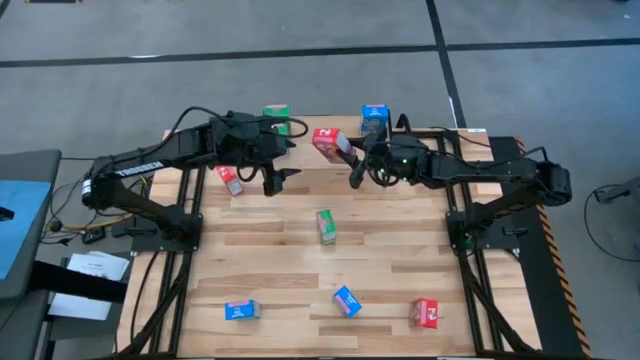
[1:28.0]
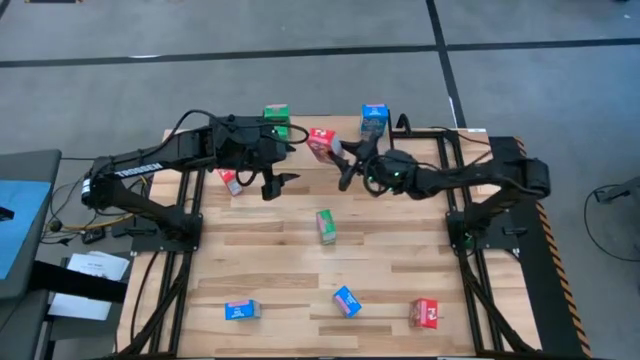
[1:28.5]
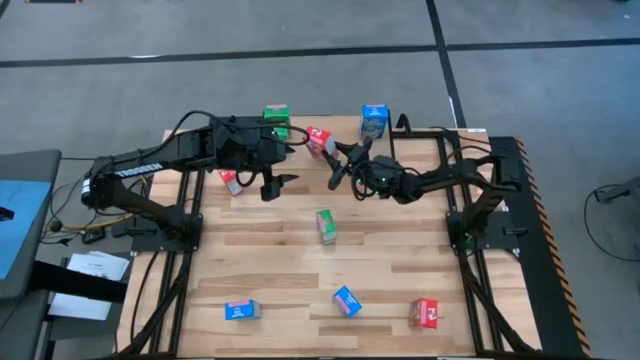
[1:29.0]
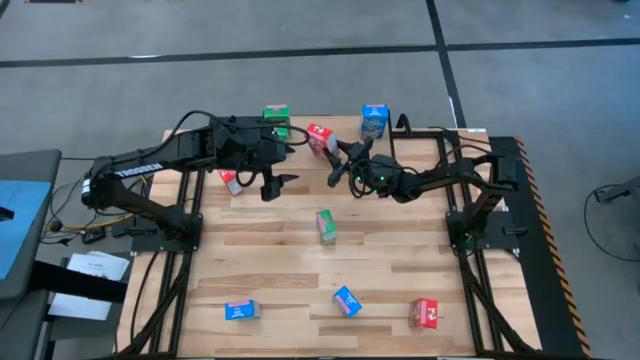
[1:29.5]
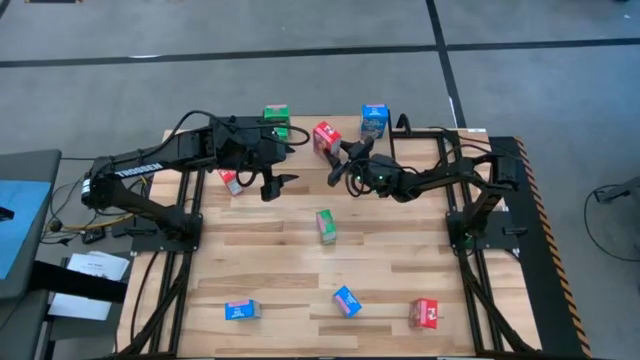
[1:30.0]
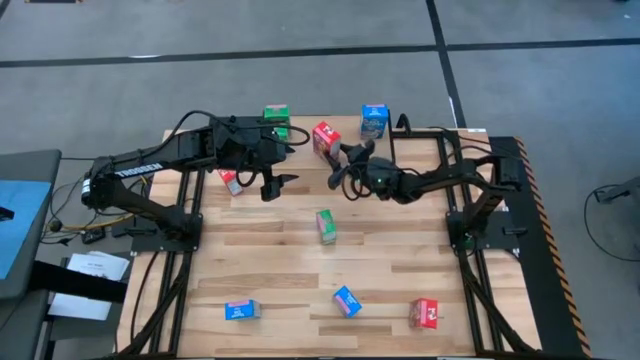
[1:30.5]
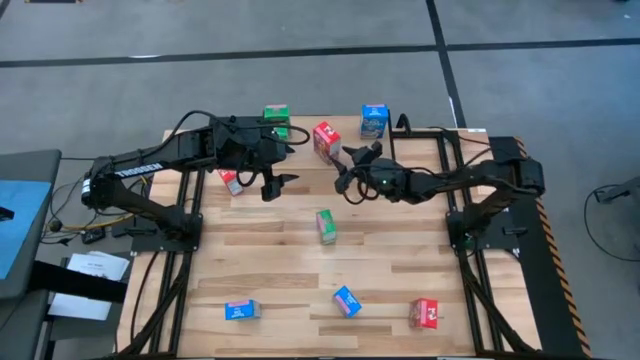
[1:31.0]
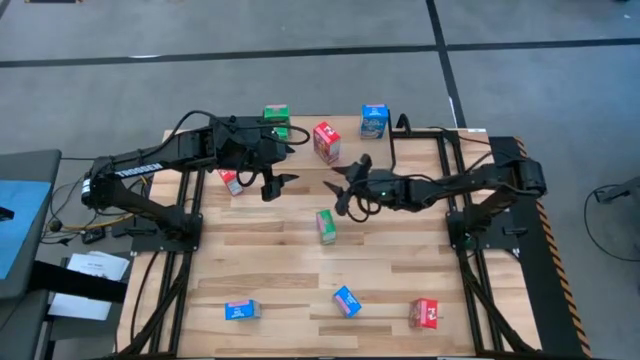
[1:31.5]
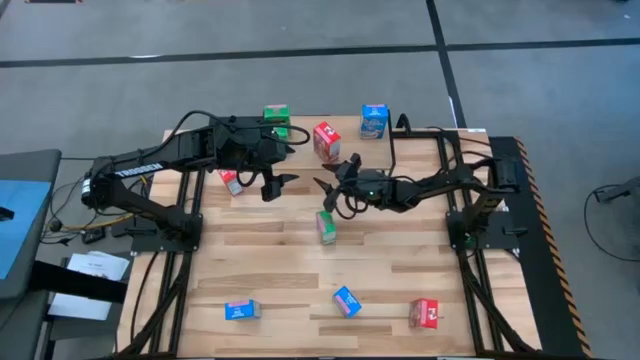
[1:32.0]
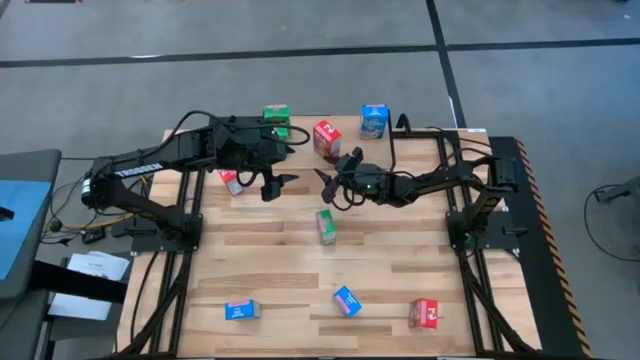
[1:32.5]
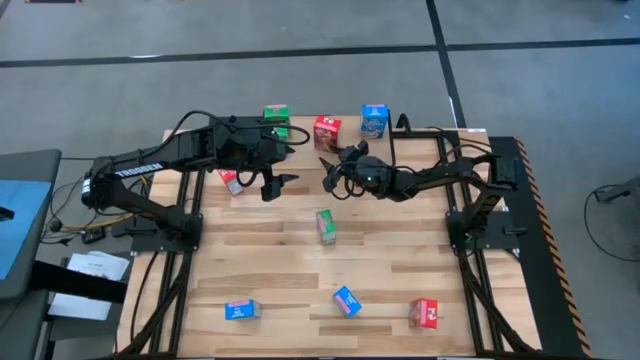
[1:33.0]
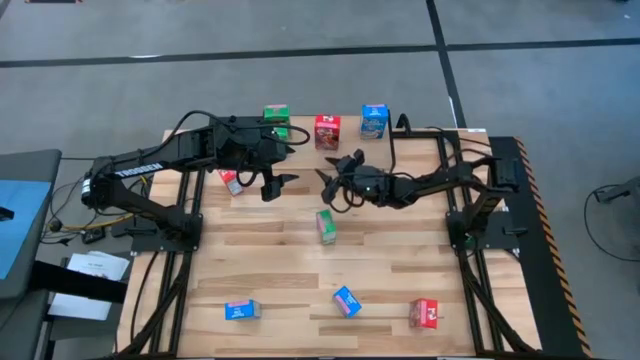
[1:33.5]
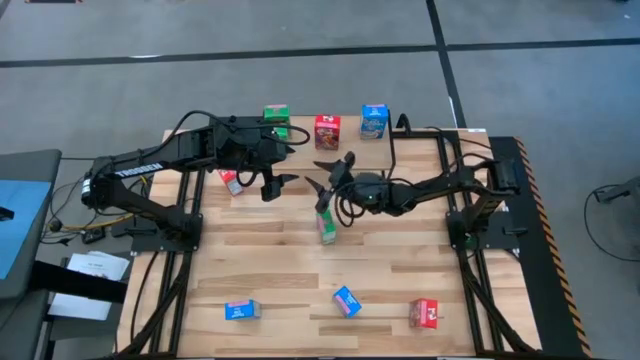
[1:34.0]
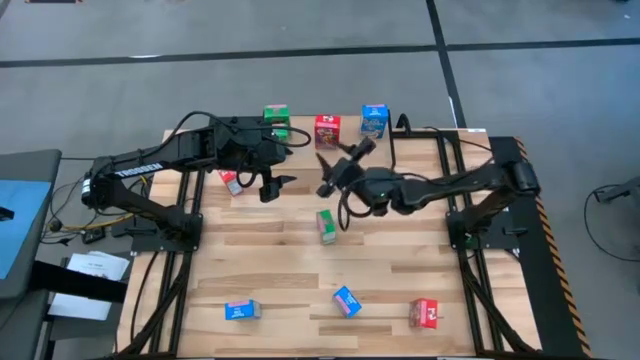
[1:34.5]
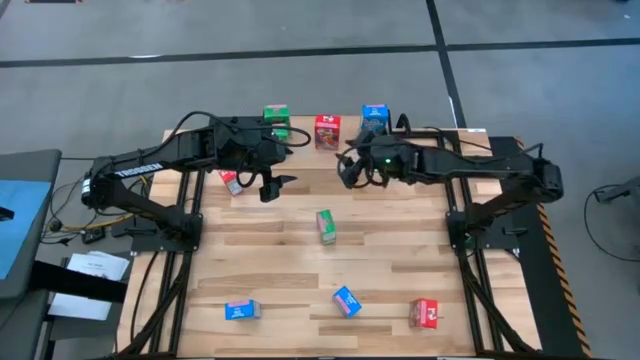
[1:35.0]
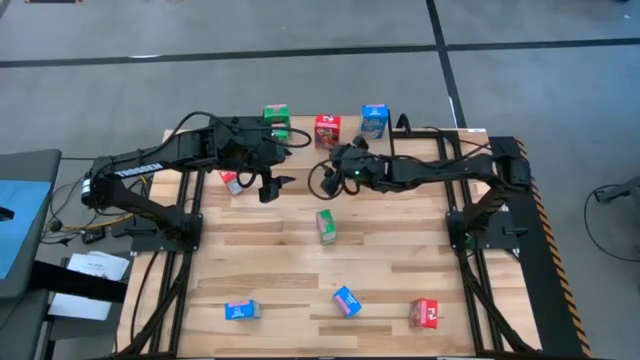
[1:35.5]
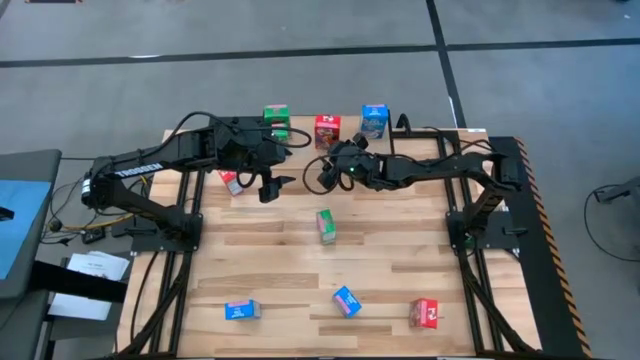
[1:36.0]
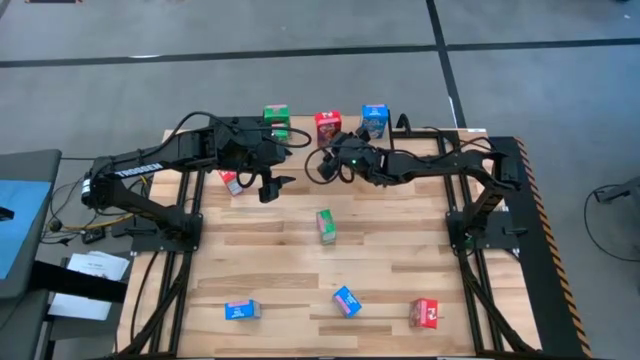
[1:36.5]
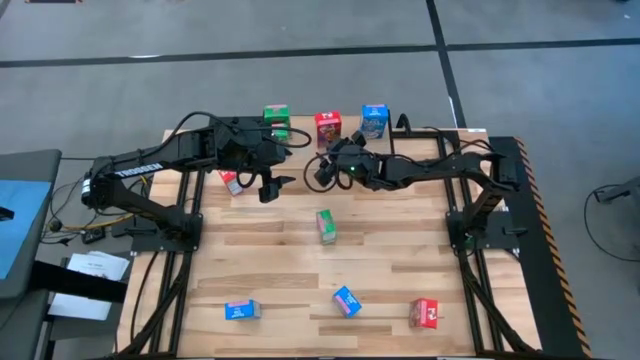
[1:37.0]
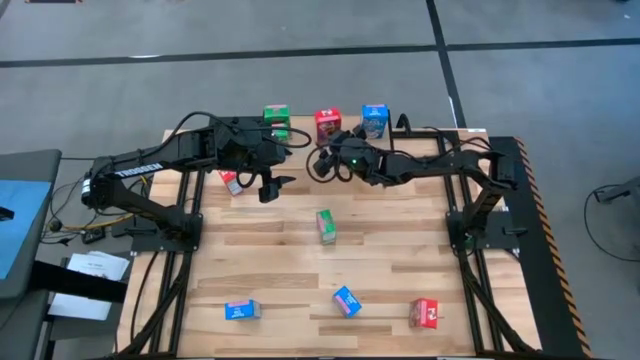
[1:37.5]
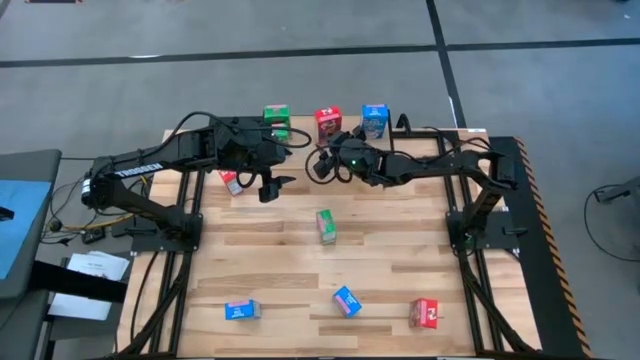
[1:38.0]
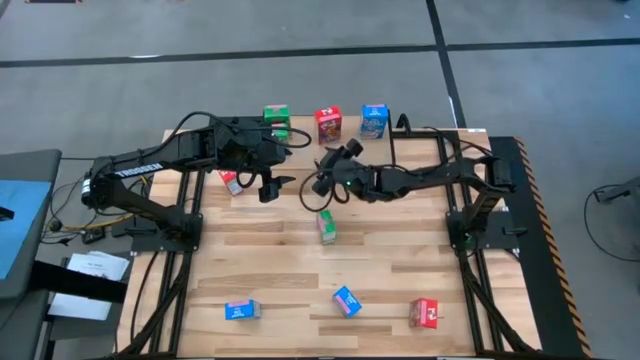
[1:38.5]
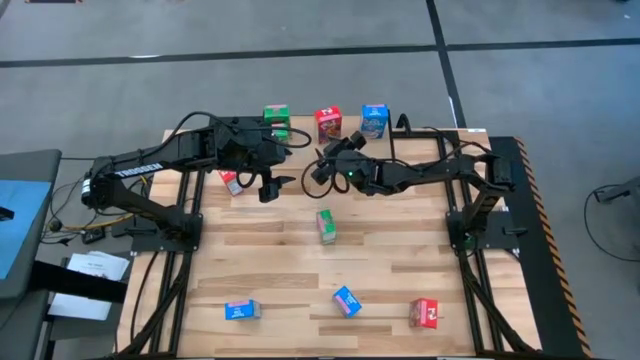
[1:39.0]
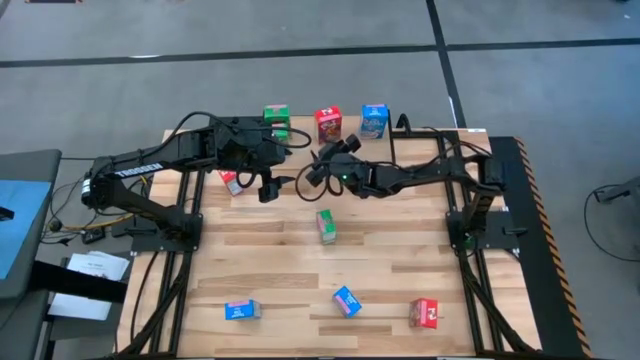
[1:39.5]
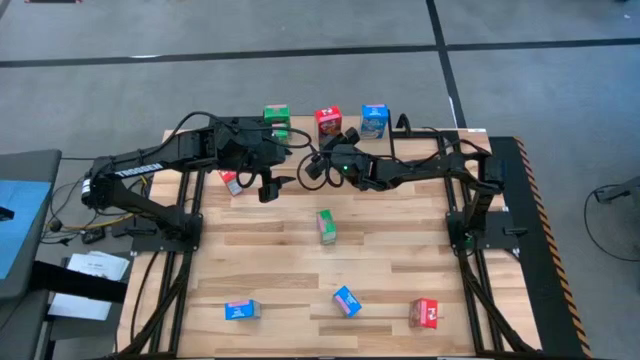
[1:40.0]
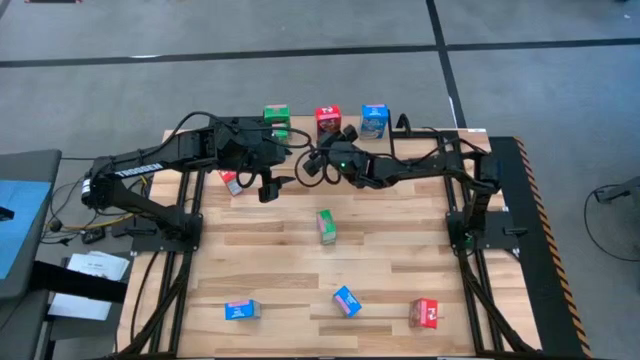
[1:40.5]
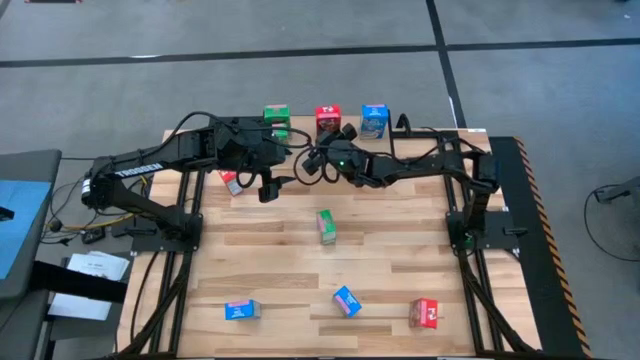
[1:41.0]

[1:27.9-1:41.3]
Task: Stack cereal on shelf
Put the bottom left red cereal box on the shelf

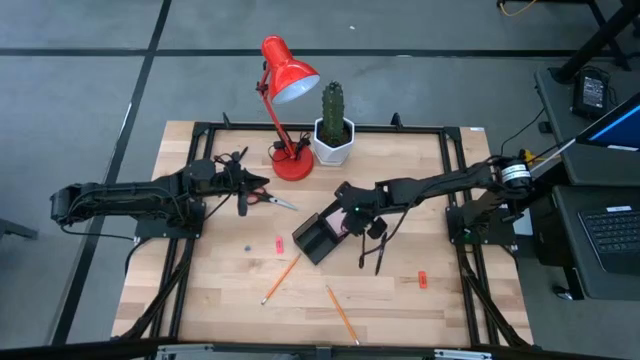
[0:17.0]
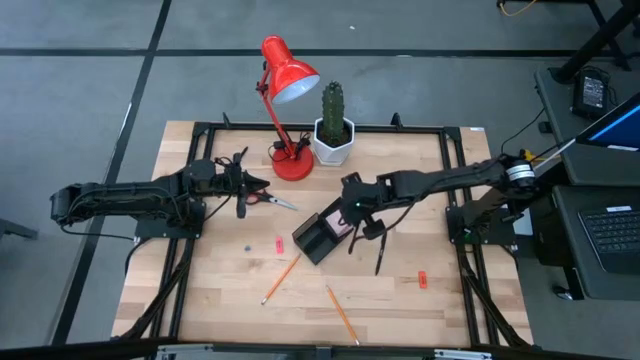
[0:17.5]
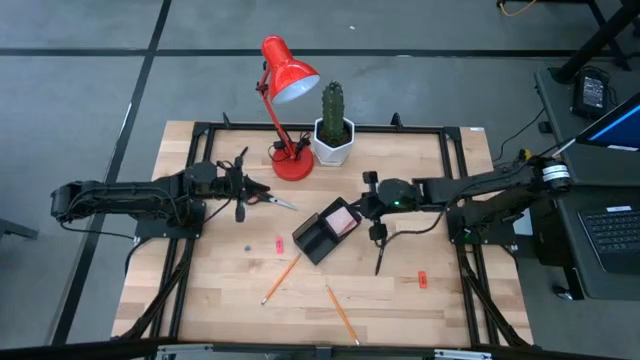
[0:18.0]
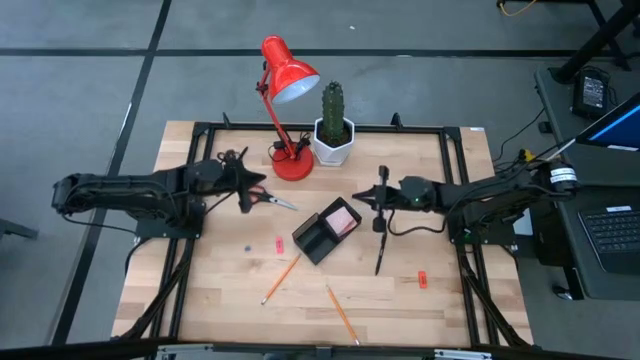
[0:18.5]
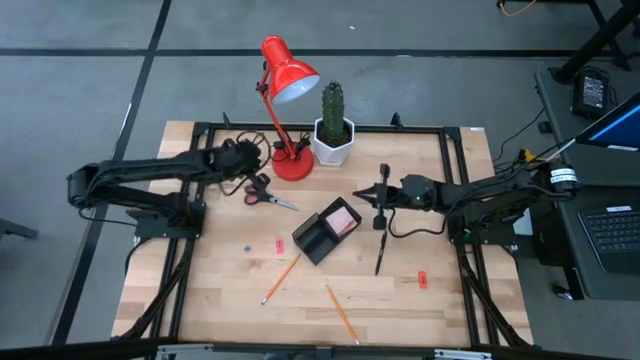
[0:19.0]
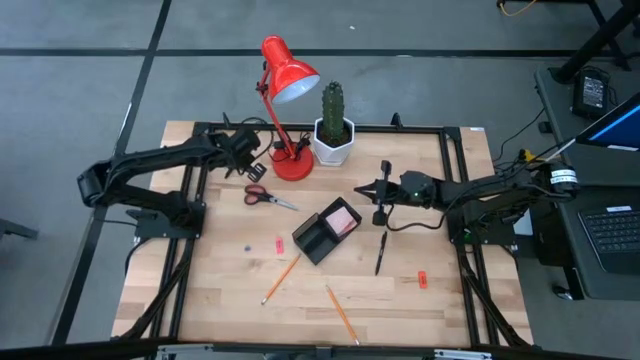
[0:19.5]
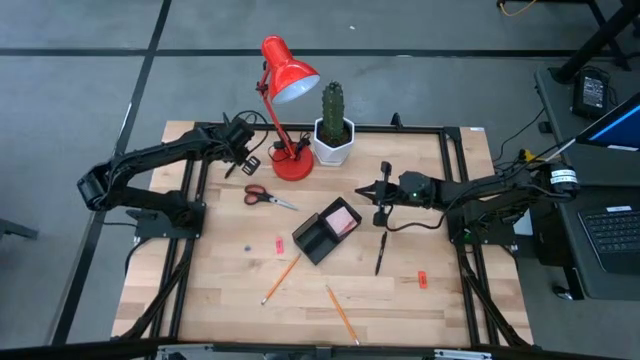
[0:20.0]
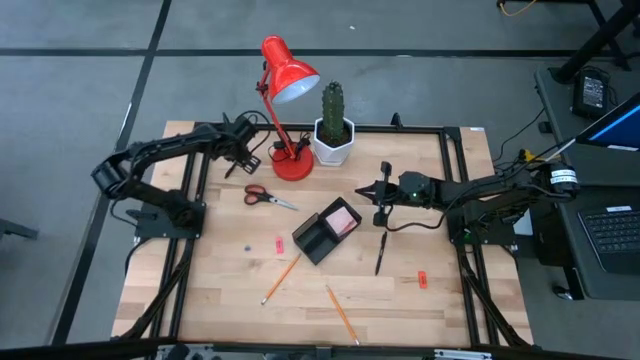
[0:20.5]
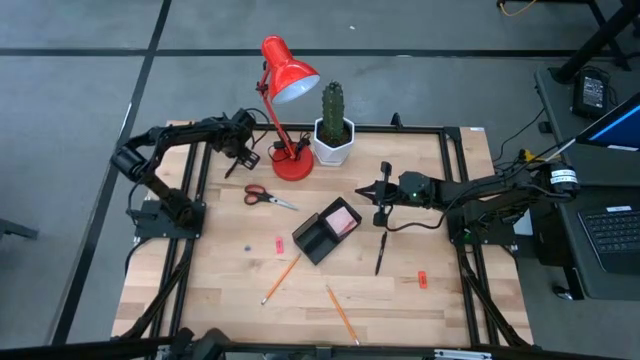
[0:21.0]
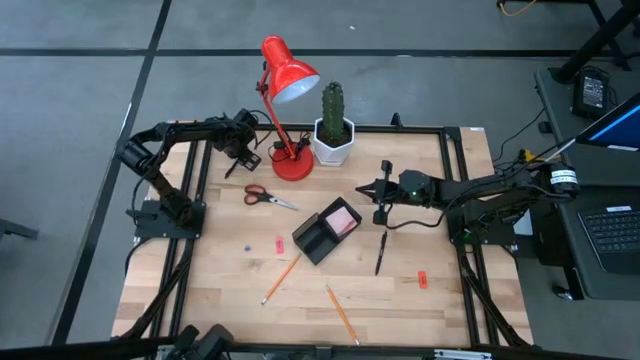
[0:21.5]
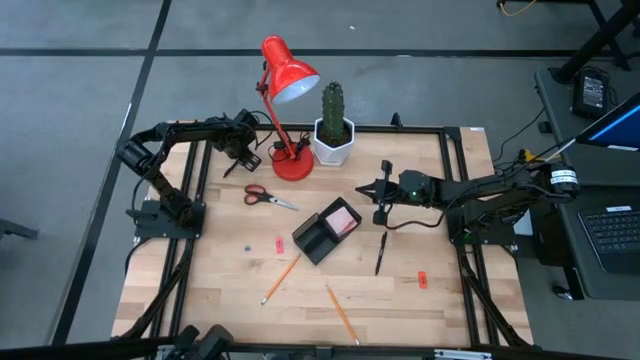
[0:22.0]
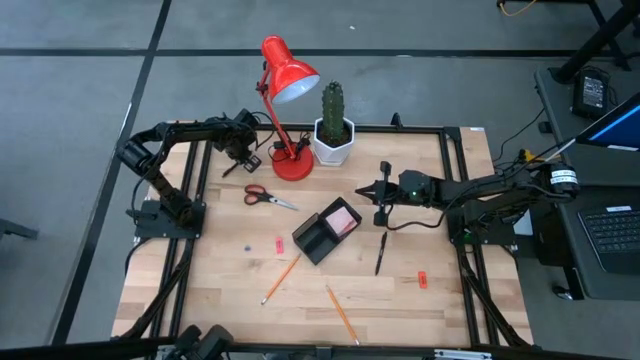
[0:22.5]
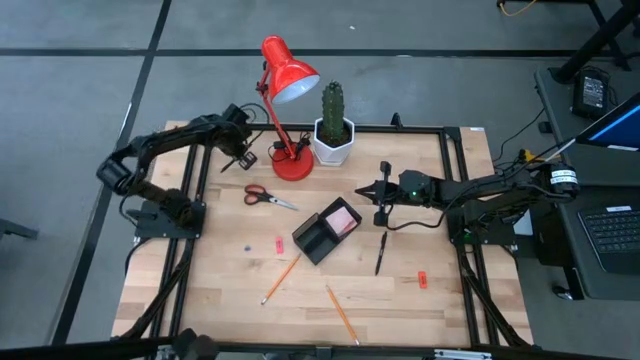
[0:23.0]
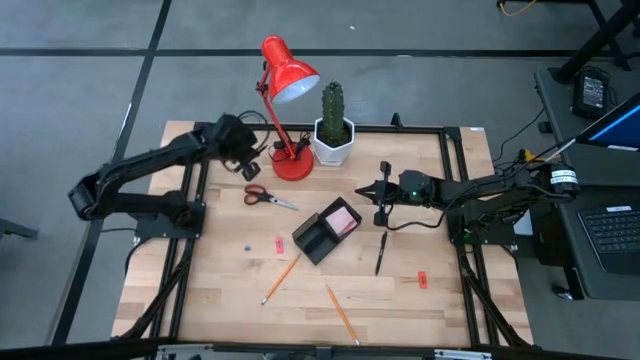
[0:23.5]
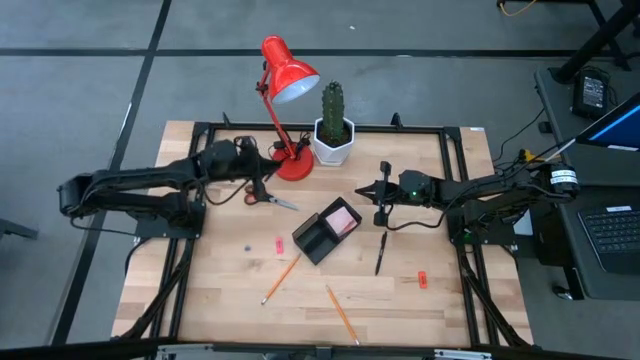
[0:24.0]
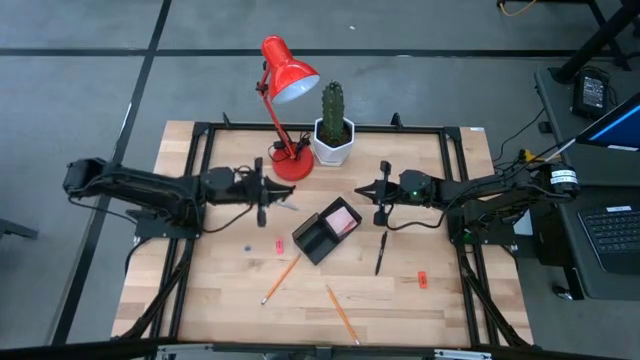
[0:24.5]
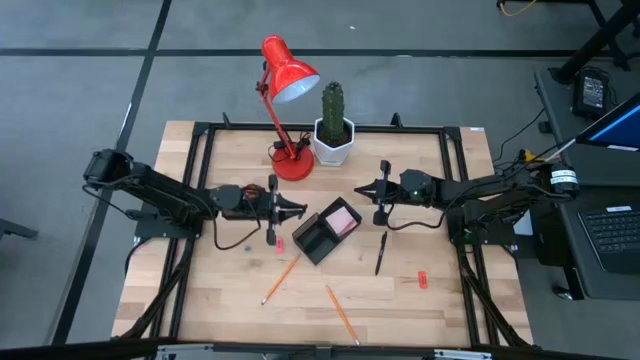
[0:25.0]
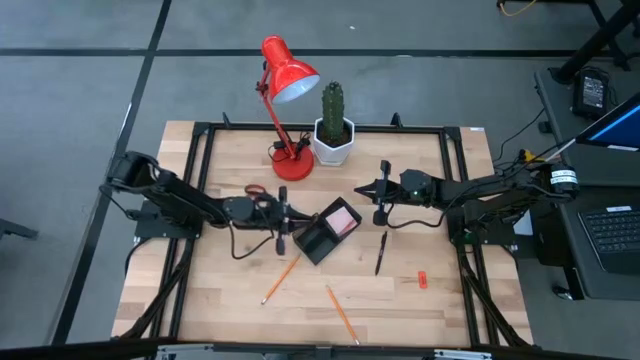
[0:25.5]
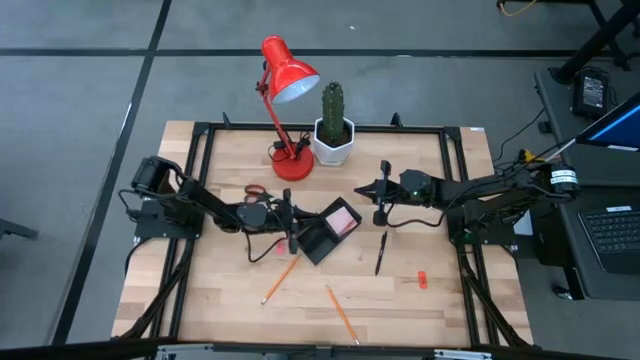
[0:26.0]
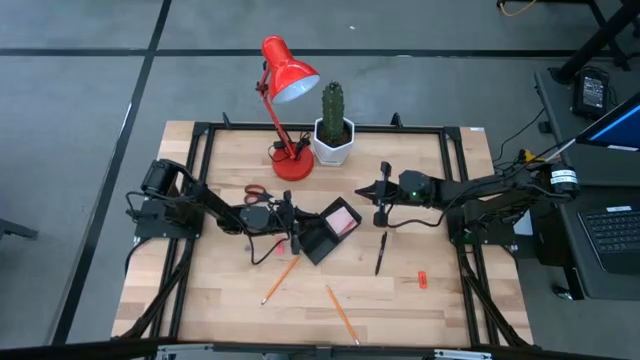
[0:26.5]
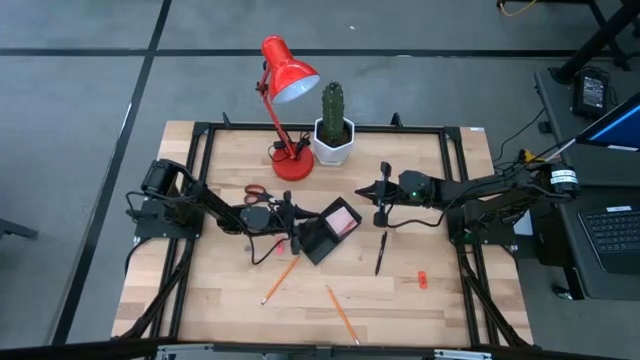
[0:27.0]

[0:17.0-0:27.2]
Task: Pick and place office supplies into organizer
Put the top black pen into the black desk organizer
